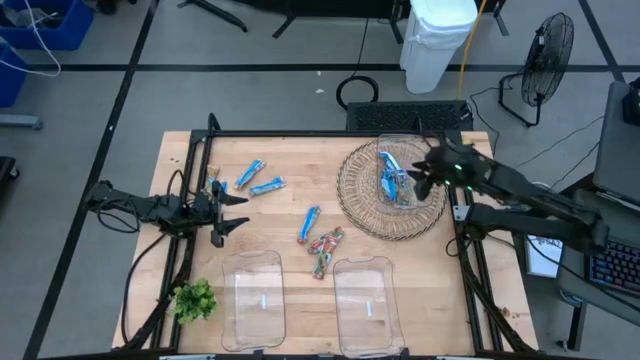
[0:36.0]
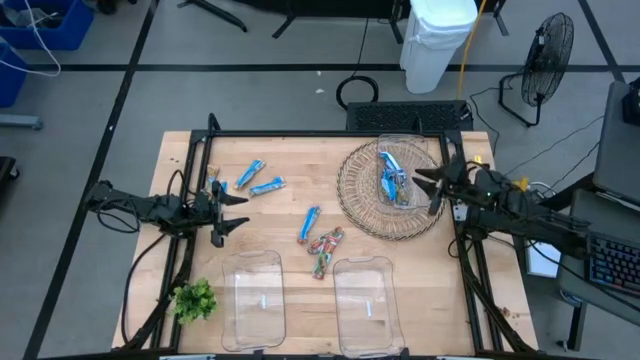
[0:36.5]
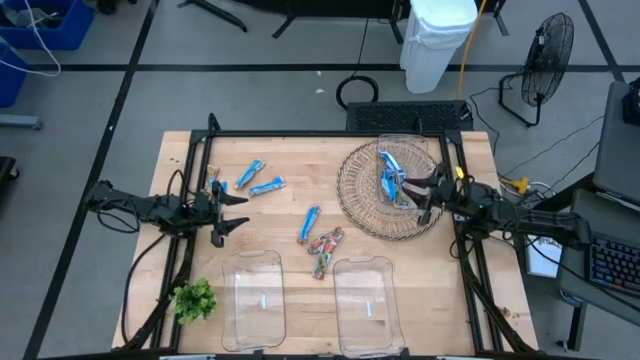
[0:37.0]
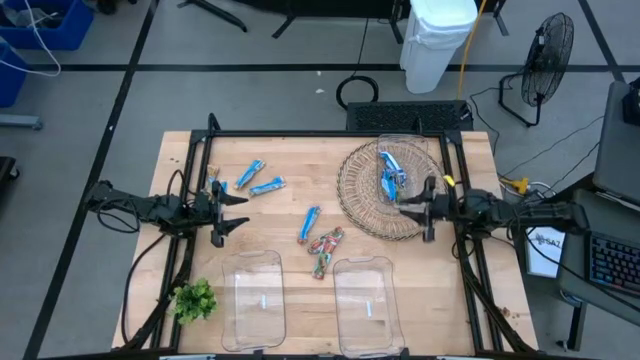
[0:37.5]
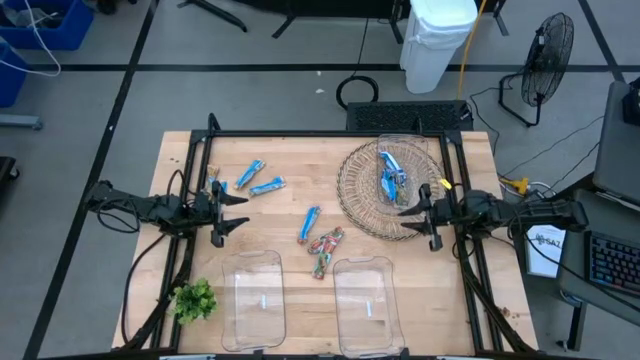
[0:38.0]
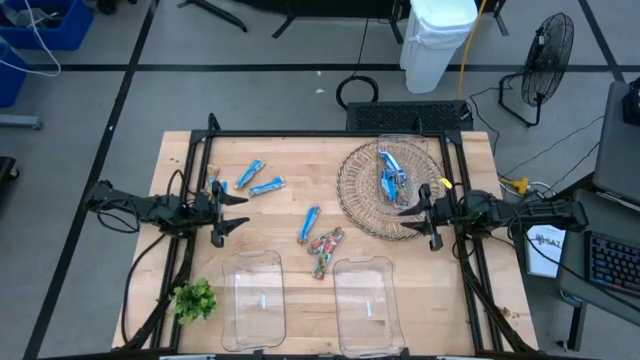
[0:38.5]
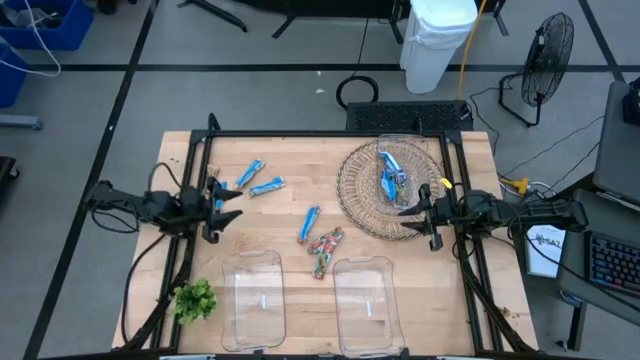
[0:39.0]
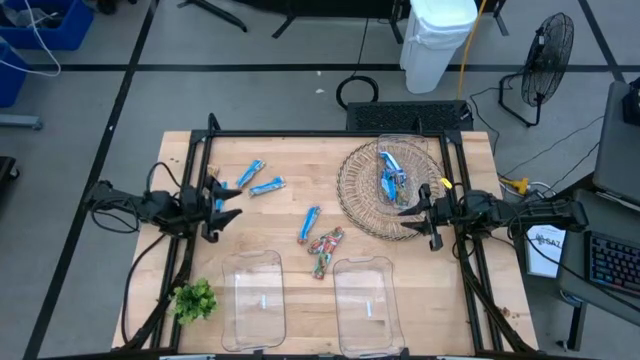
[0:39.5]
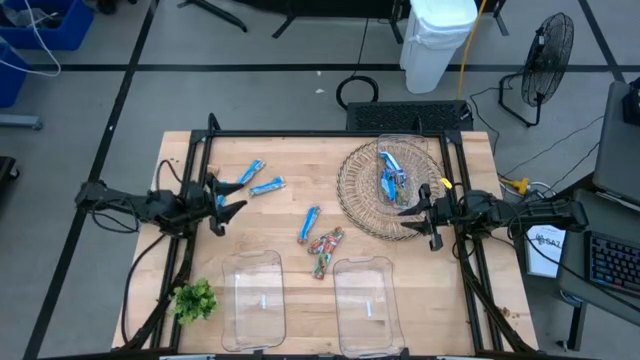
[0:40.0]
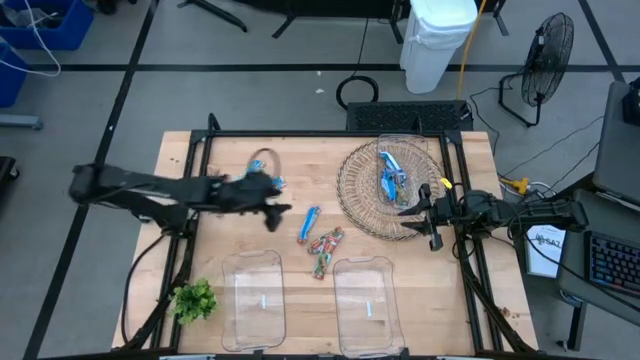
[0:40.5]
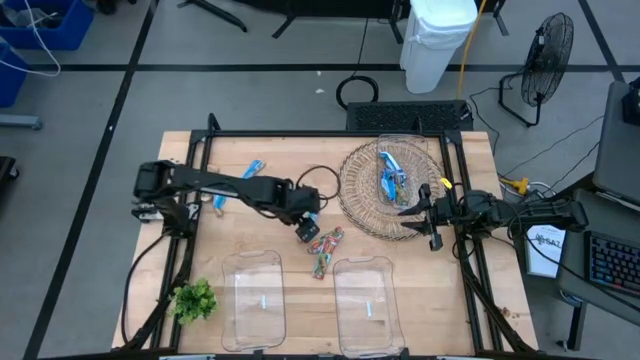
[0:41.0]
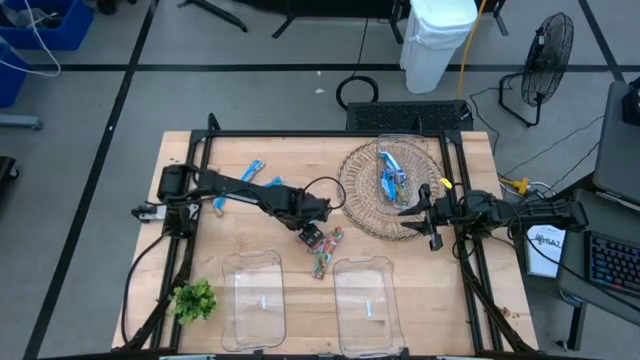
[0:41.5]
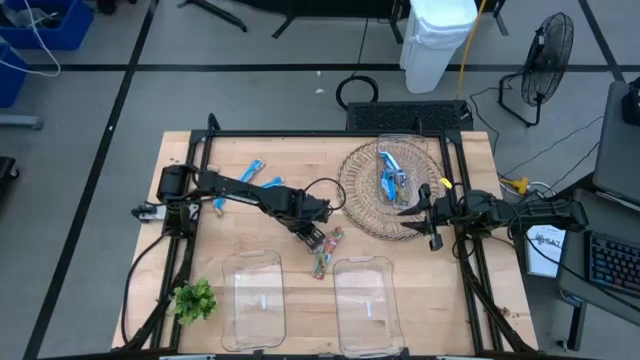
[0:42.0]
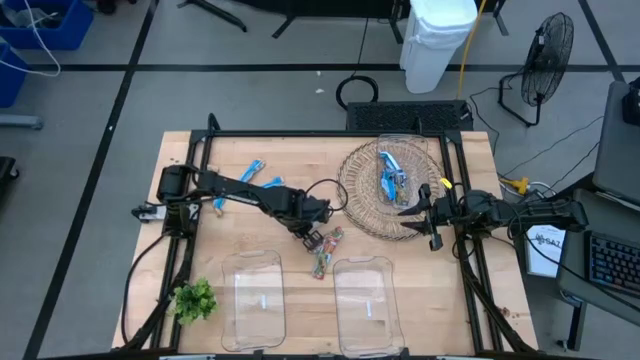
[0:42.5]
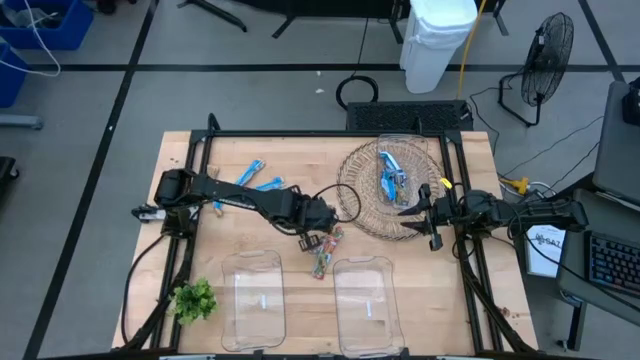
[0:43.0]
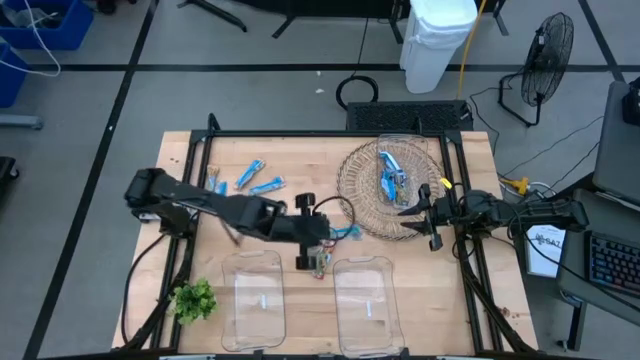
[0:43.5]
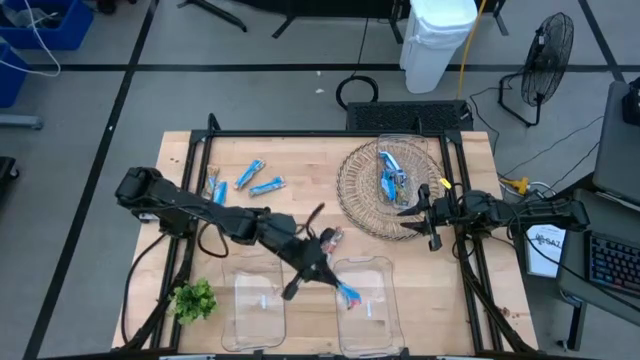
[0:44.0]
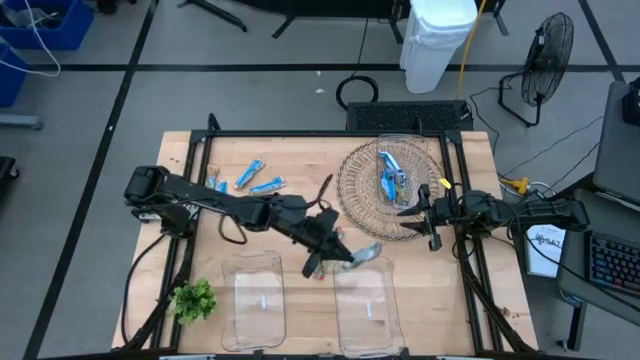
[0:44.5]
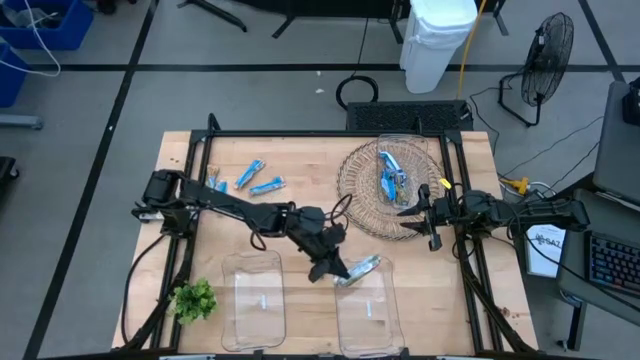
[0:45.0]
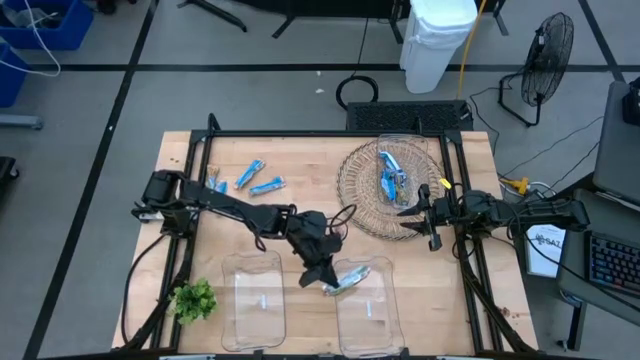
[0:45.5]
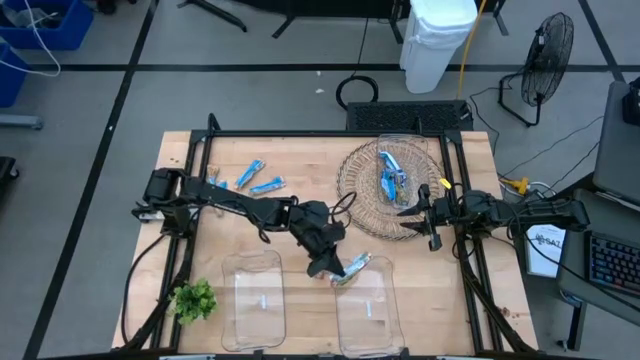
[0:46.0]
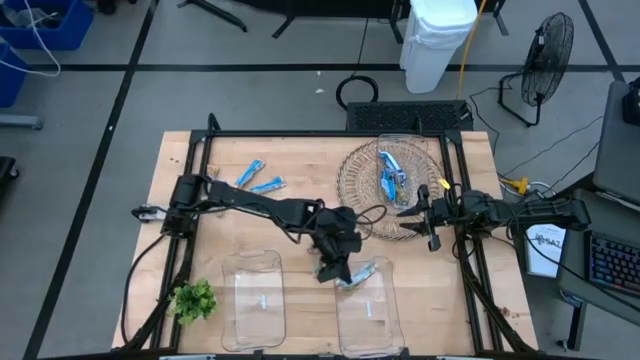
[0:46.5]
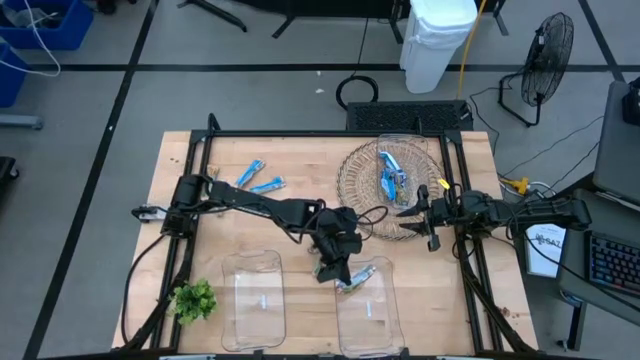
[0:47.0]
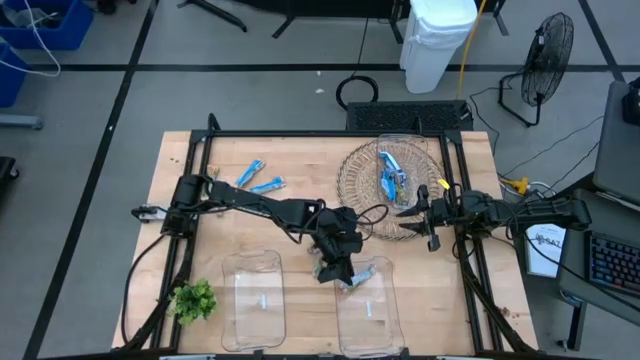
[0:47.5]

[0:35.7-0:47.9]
Task: Pick and place Granola Bars by type
Put the top red granola bar into the bottom middle transparent bin

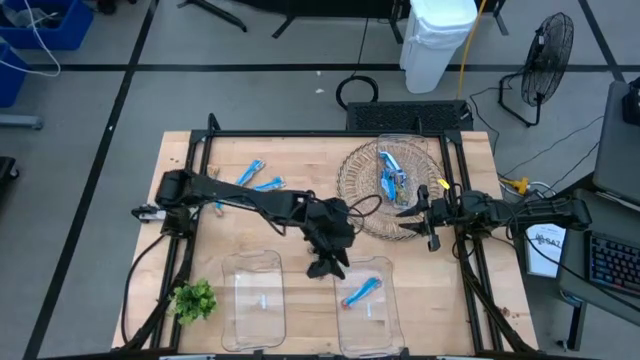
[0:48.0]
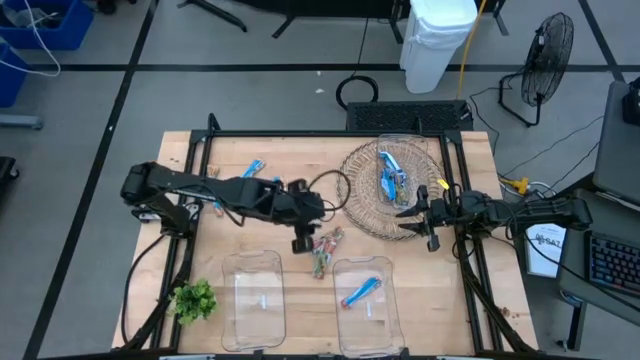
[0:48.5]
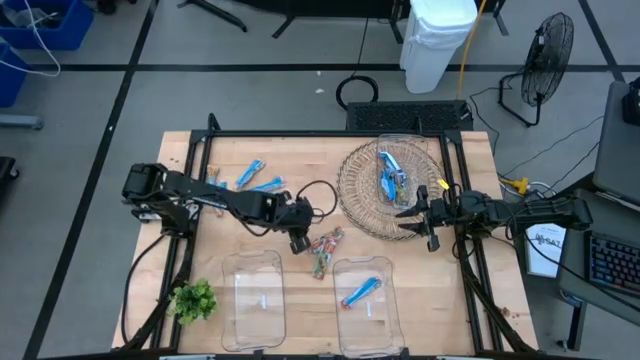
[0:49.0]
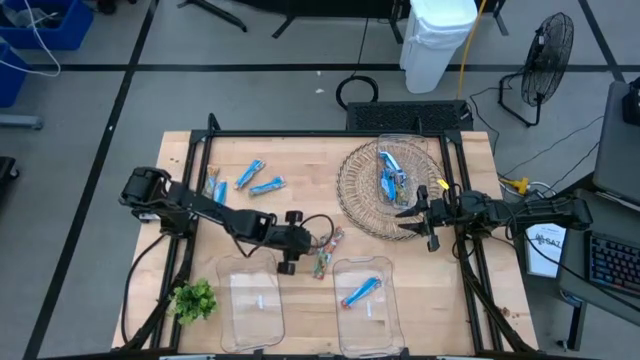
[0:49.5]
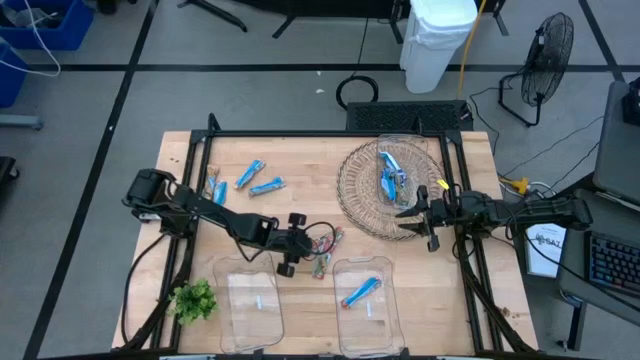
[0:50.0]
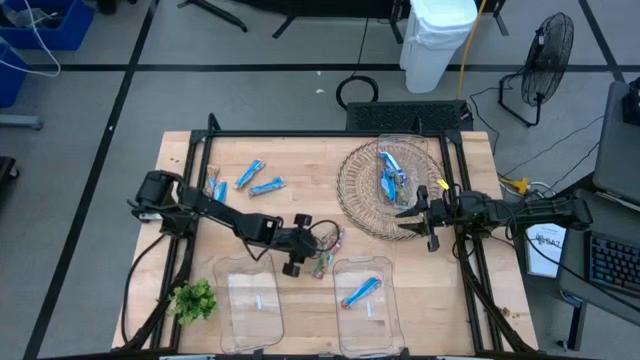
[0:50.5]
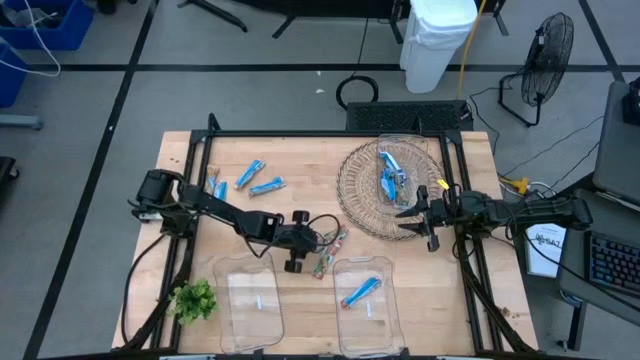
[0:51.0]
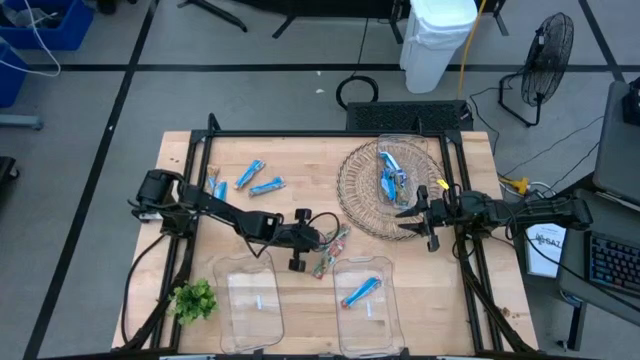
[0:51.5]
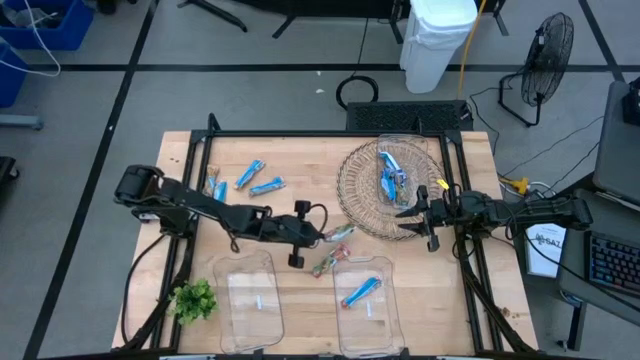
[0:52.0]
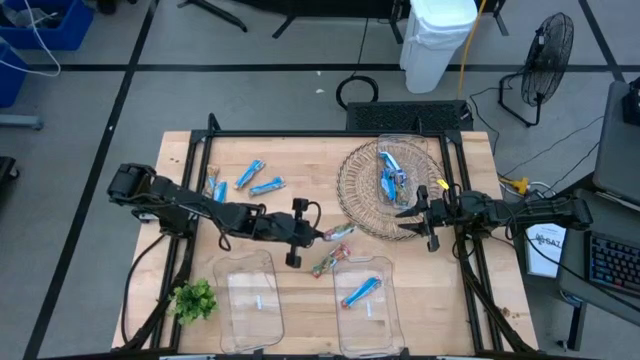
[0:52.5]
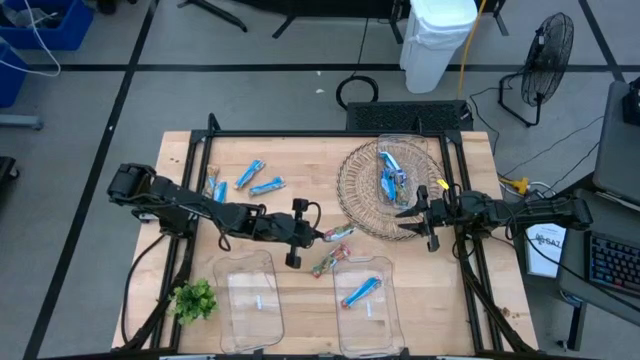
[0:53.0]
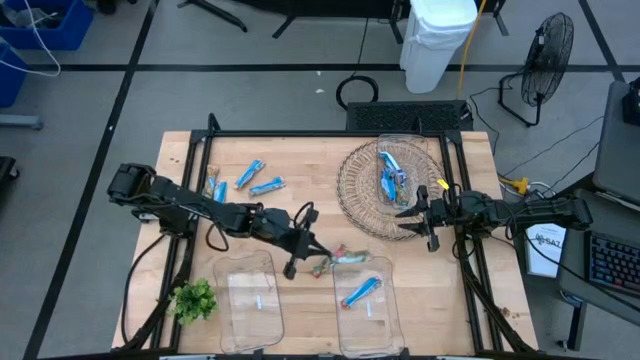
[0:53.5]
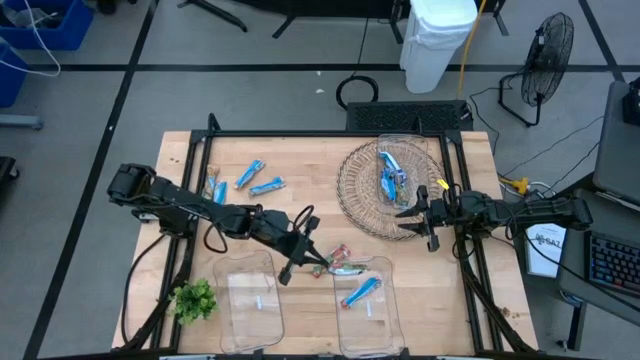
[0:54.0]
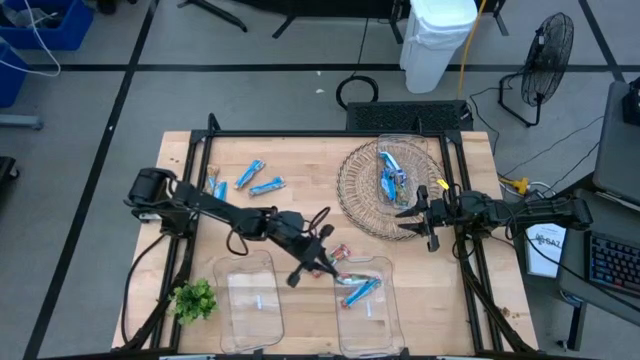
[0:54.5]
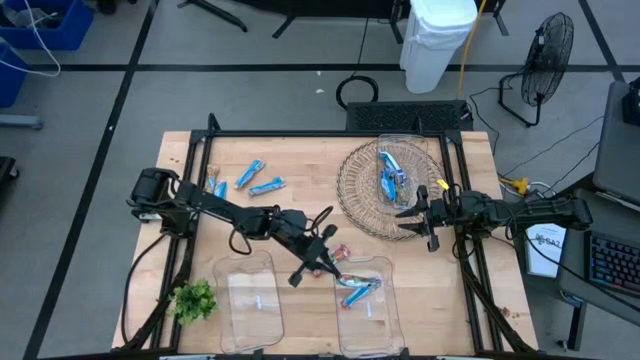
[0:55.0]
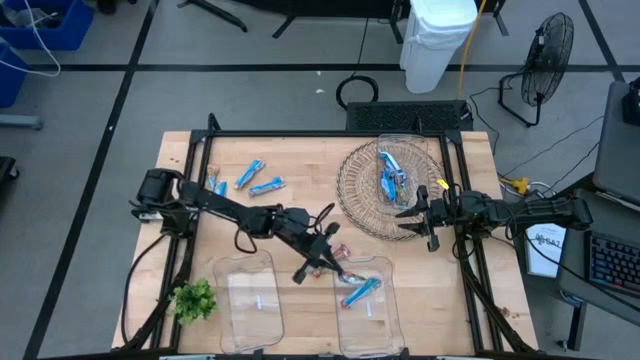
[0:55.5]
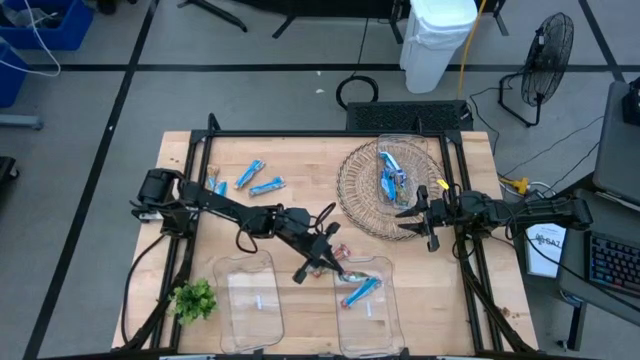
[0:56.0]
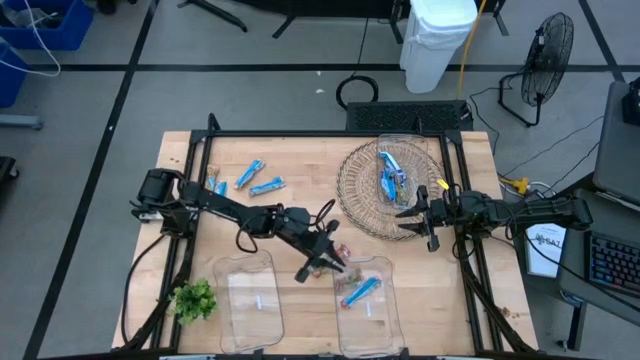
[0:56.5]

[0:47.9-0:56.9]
Put the top right red granola bar into the bottom middle transparent bin

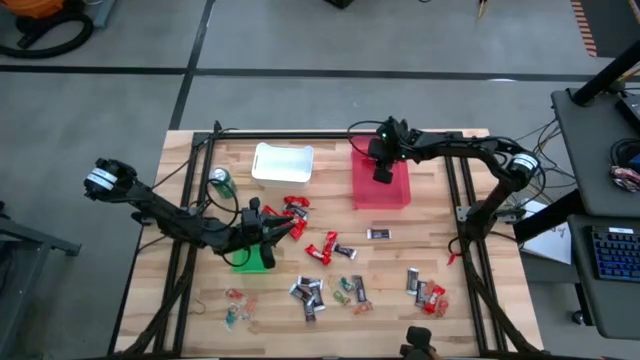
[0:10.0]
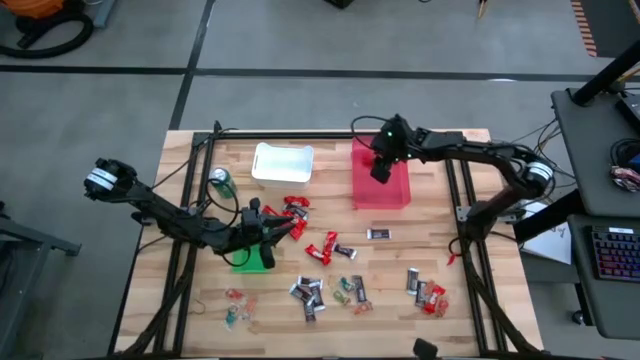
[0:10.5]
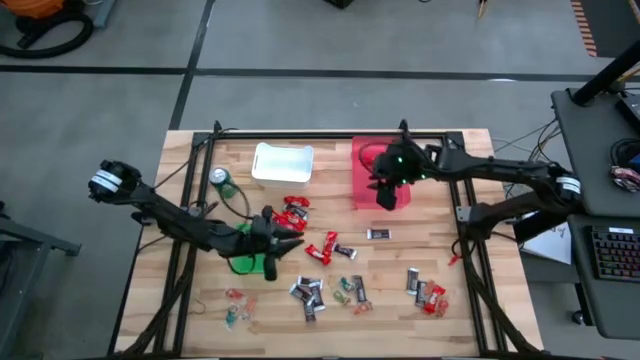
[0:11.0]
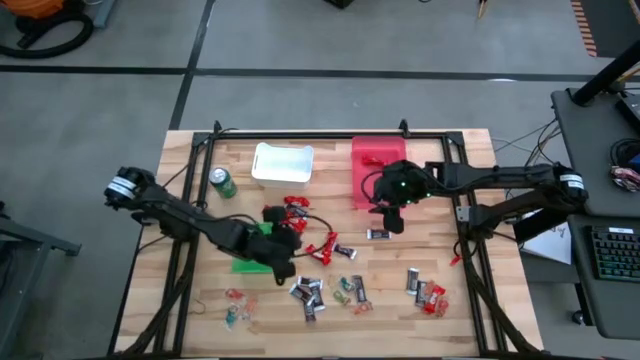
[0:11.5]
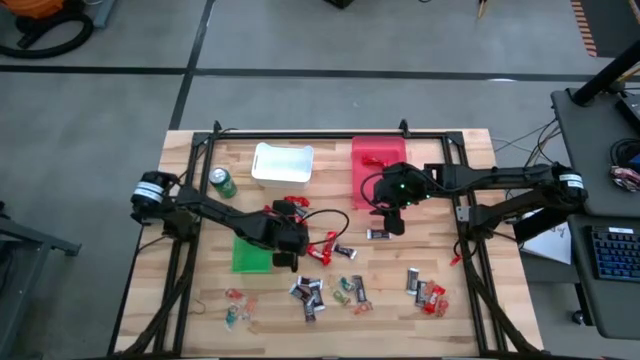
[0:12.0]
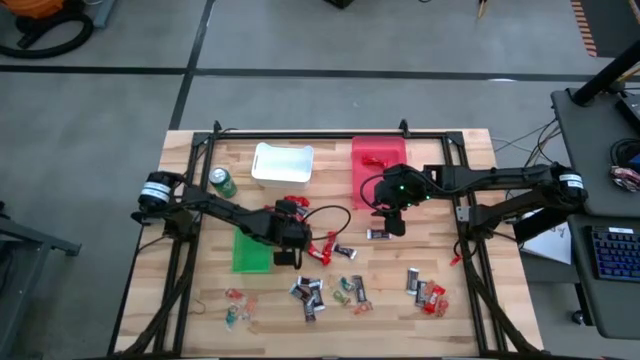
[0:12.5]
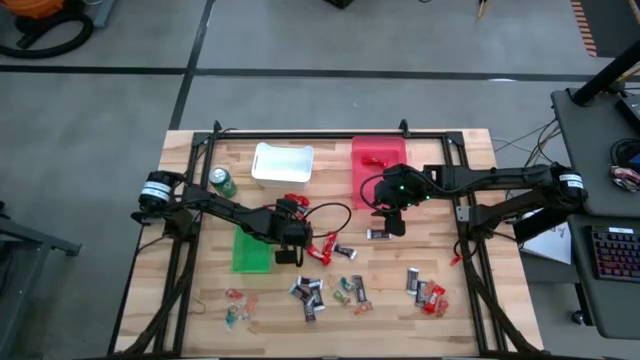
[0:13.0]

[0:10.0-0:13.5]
Task: Organize candy in baskets
Put the red chocolate into the pink bin
